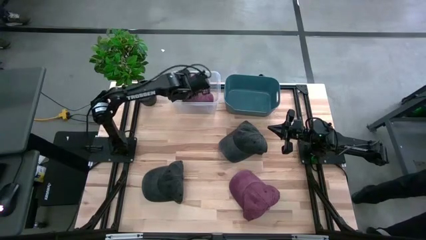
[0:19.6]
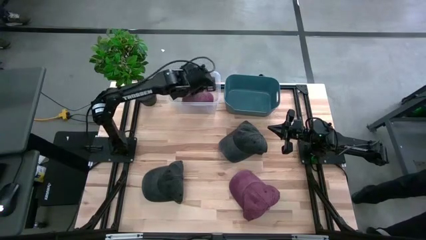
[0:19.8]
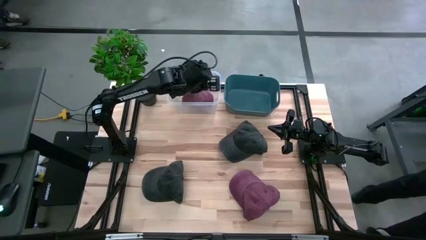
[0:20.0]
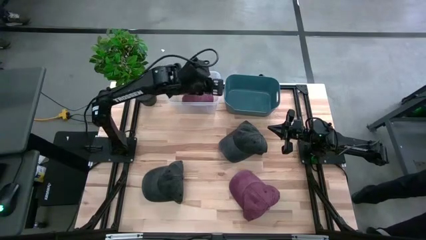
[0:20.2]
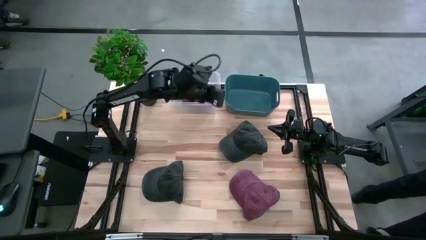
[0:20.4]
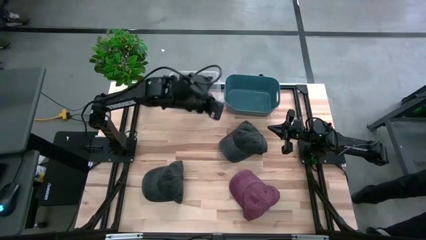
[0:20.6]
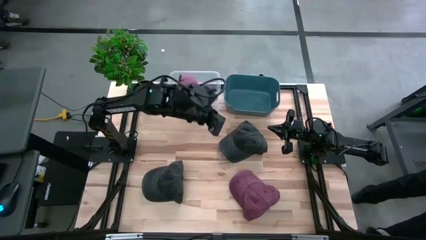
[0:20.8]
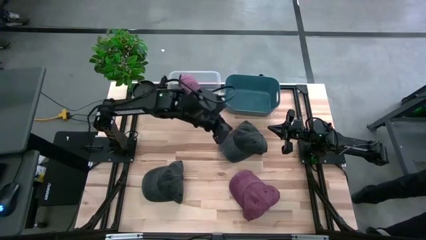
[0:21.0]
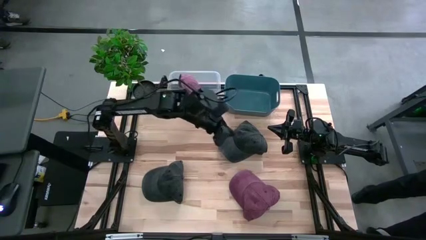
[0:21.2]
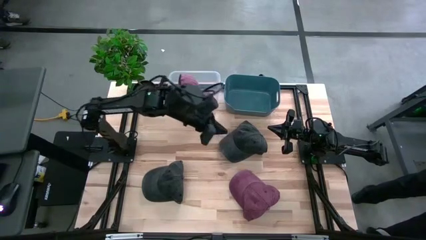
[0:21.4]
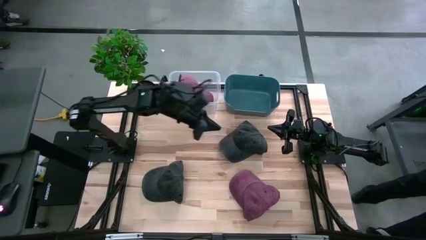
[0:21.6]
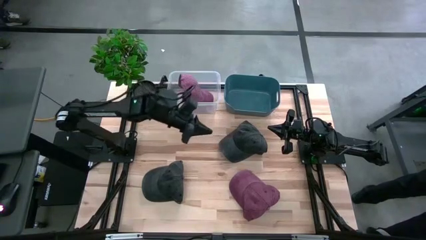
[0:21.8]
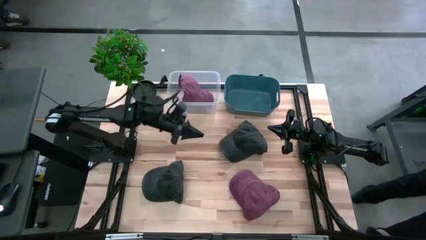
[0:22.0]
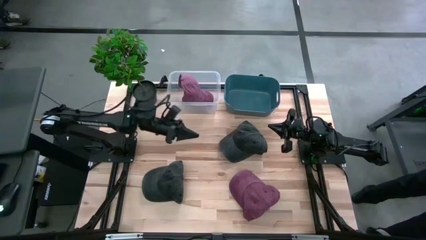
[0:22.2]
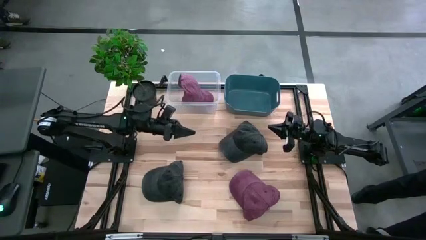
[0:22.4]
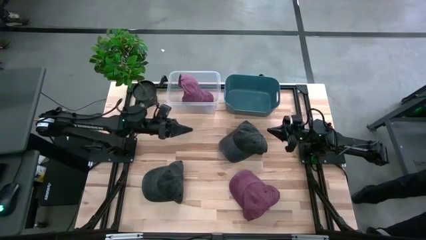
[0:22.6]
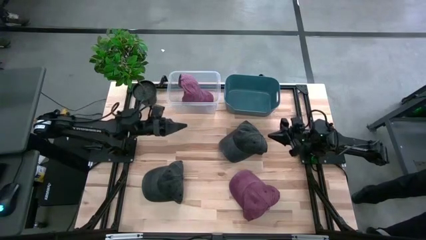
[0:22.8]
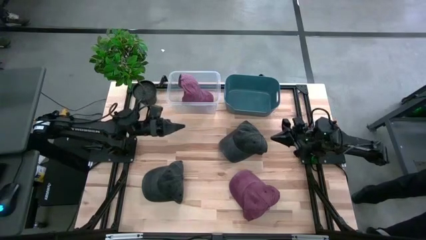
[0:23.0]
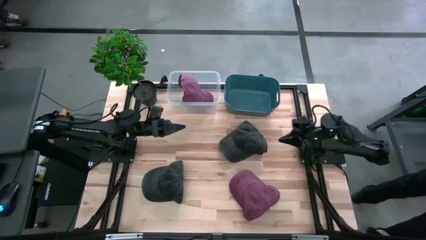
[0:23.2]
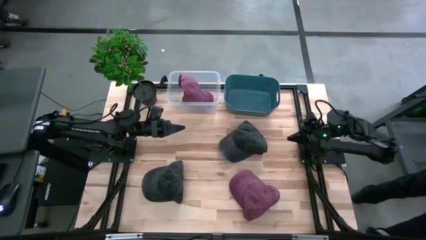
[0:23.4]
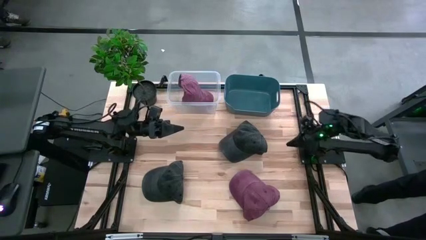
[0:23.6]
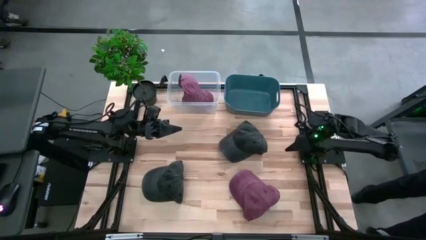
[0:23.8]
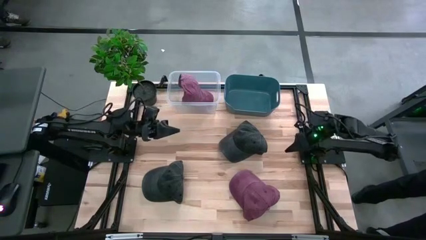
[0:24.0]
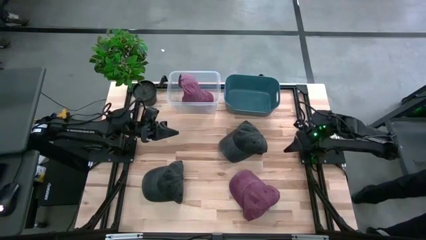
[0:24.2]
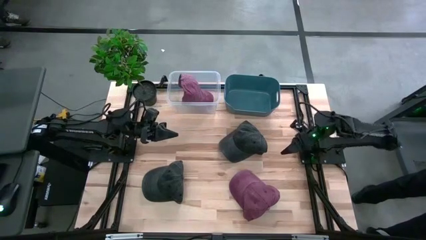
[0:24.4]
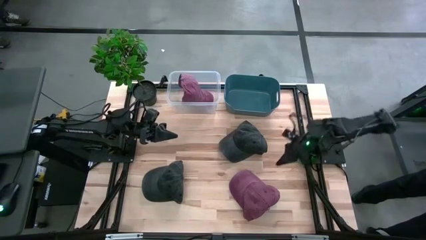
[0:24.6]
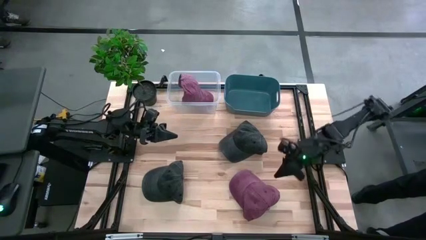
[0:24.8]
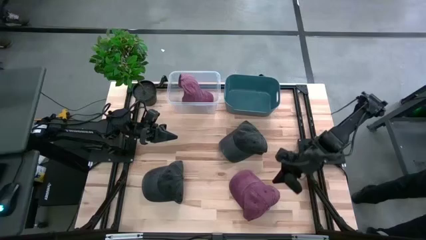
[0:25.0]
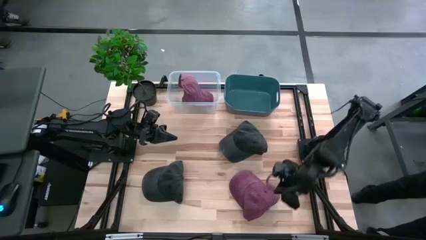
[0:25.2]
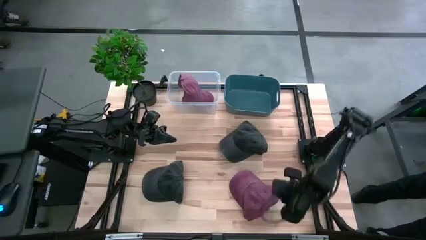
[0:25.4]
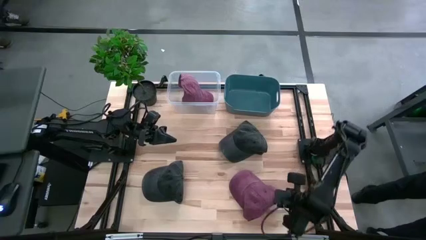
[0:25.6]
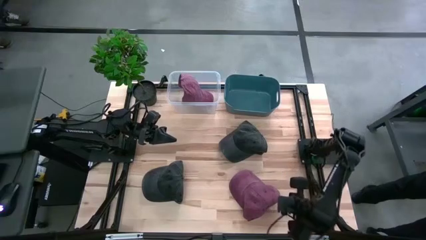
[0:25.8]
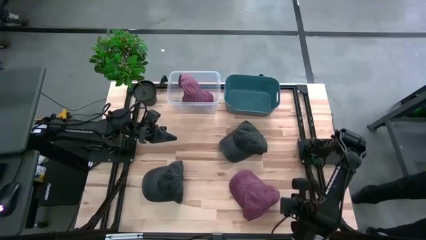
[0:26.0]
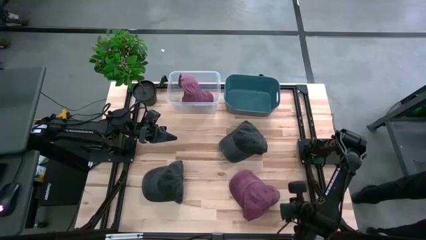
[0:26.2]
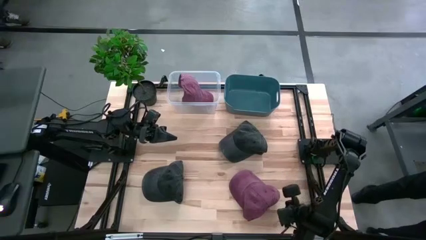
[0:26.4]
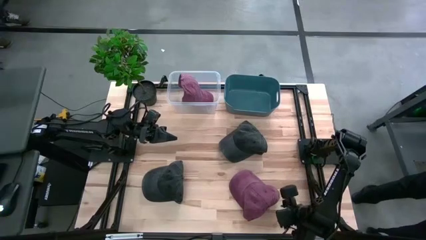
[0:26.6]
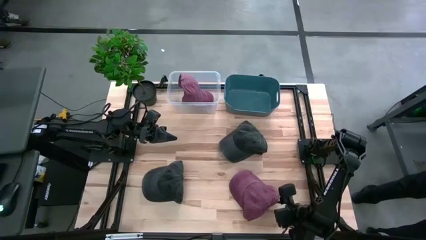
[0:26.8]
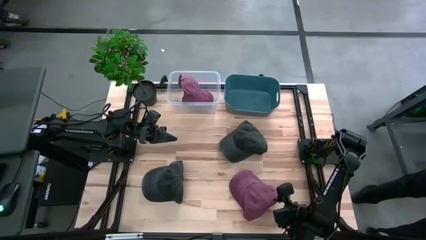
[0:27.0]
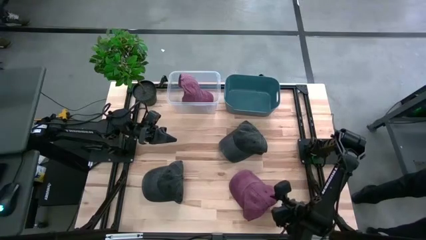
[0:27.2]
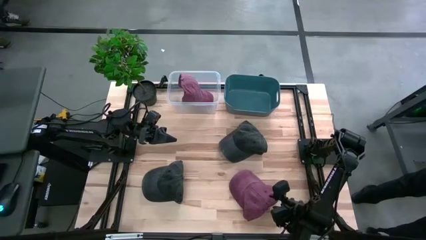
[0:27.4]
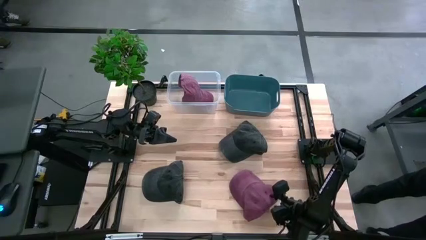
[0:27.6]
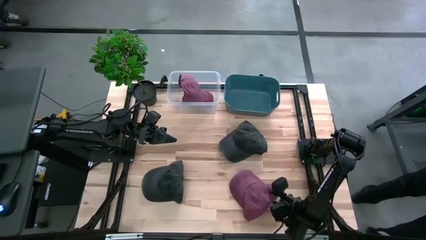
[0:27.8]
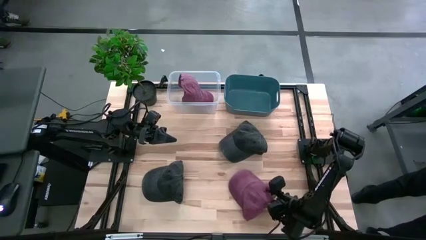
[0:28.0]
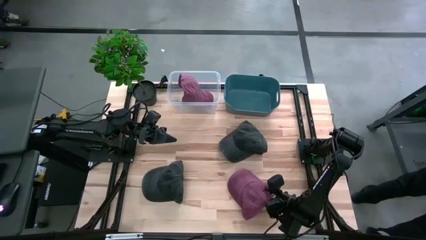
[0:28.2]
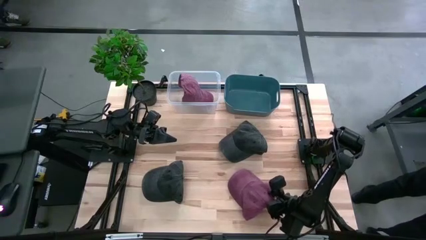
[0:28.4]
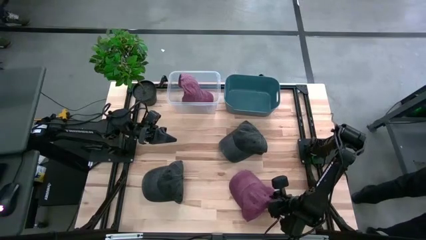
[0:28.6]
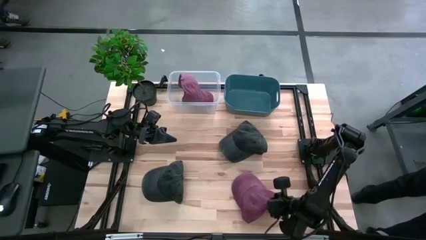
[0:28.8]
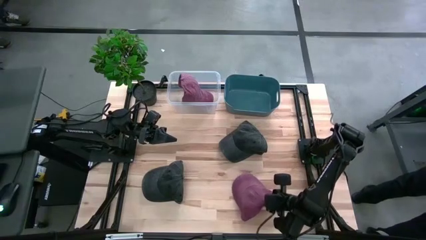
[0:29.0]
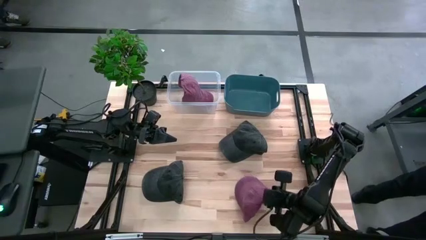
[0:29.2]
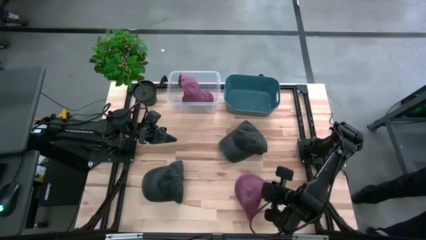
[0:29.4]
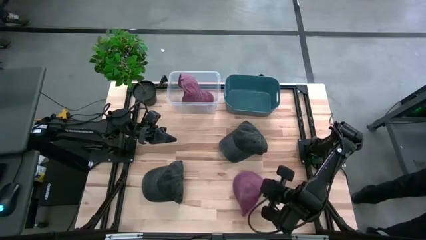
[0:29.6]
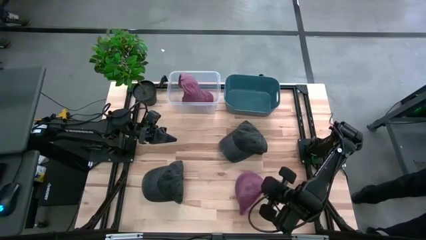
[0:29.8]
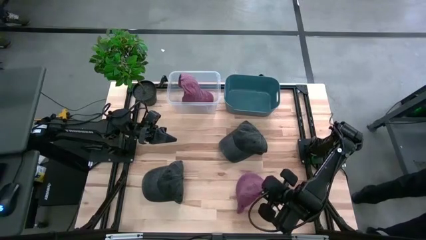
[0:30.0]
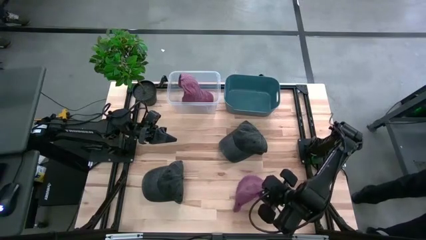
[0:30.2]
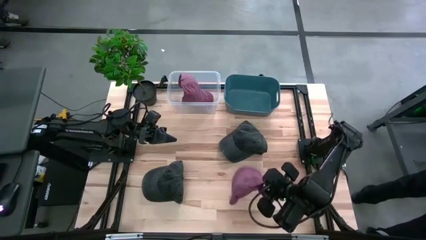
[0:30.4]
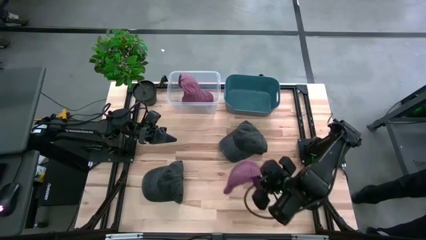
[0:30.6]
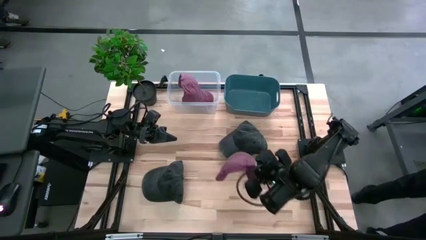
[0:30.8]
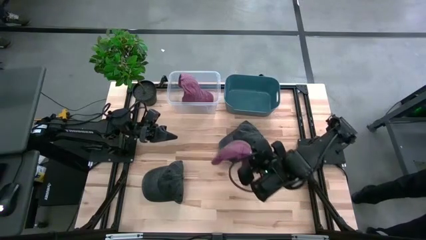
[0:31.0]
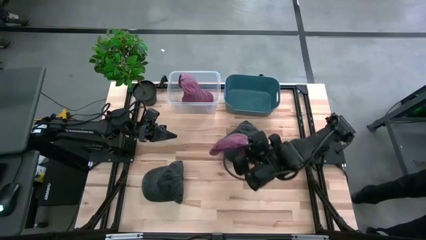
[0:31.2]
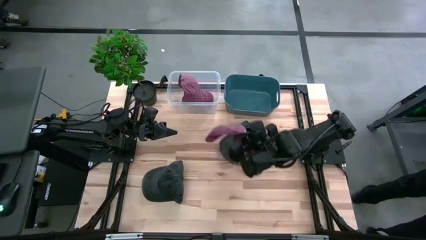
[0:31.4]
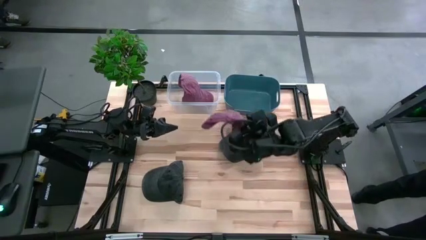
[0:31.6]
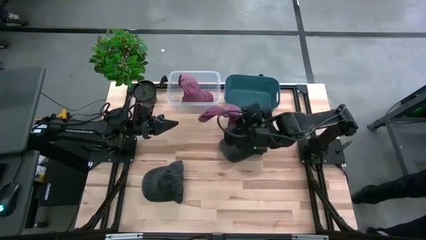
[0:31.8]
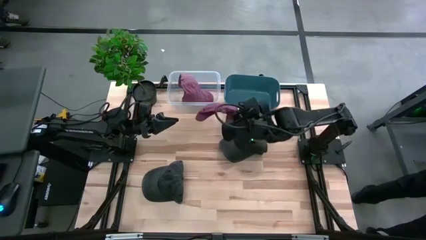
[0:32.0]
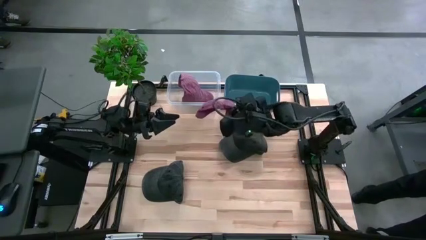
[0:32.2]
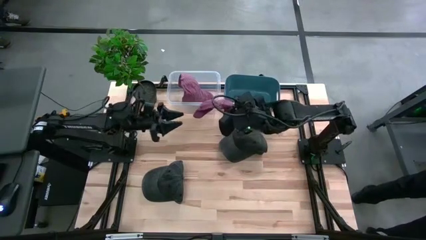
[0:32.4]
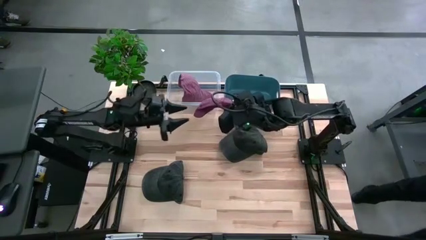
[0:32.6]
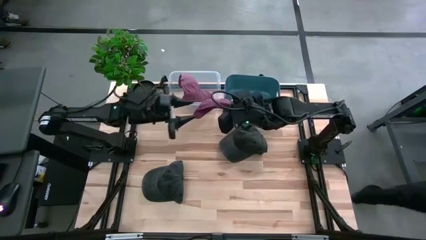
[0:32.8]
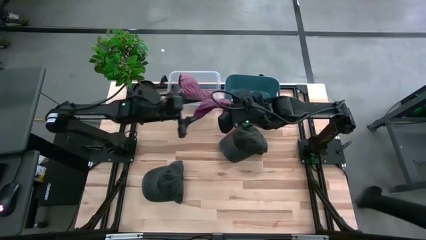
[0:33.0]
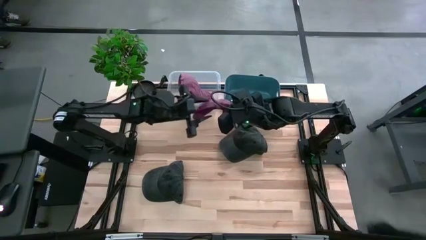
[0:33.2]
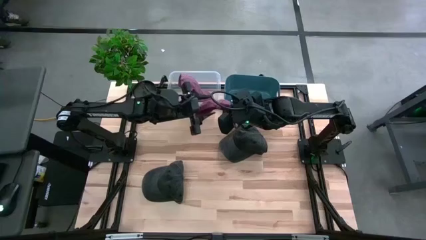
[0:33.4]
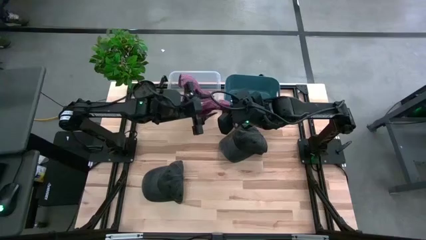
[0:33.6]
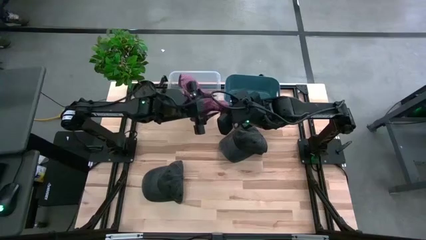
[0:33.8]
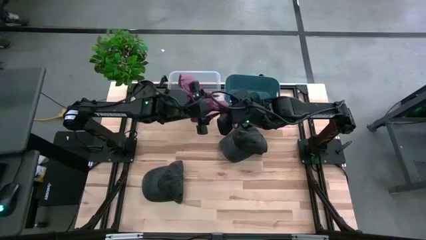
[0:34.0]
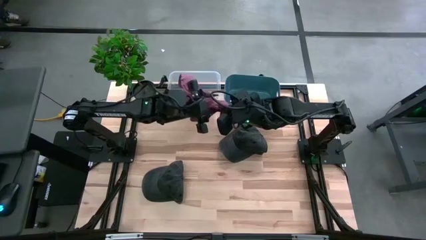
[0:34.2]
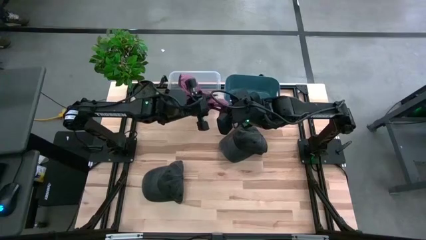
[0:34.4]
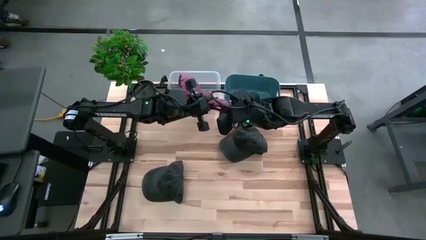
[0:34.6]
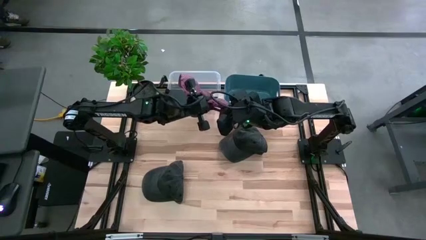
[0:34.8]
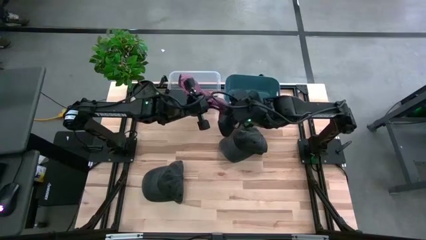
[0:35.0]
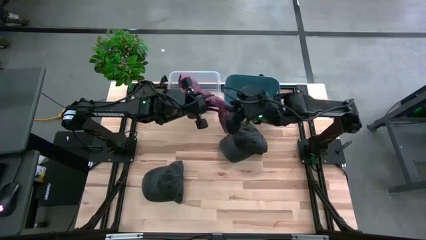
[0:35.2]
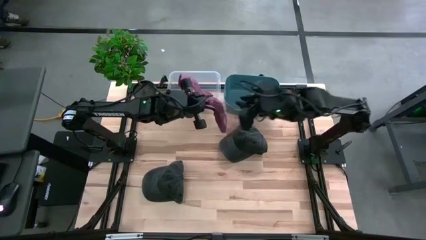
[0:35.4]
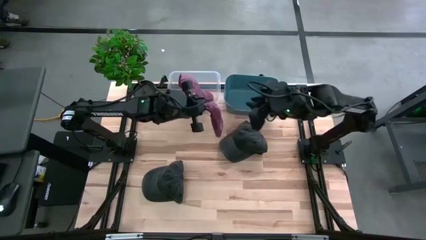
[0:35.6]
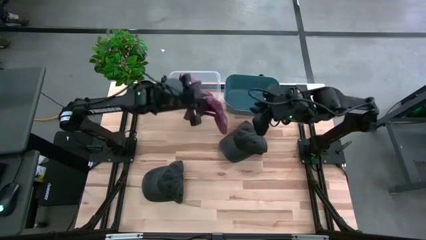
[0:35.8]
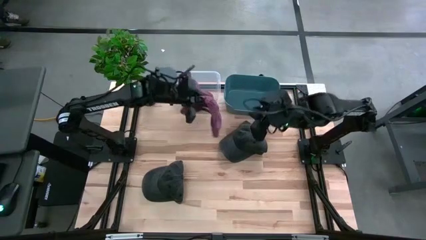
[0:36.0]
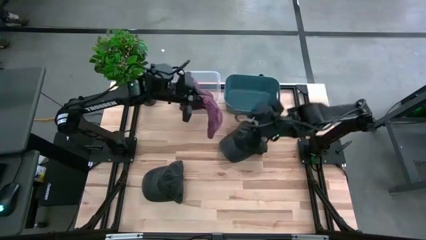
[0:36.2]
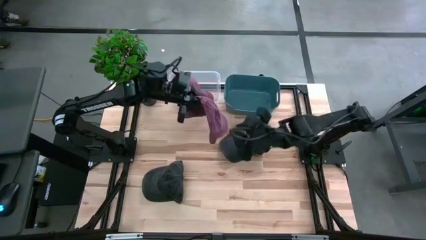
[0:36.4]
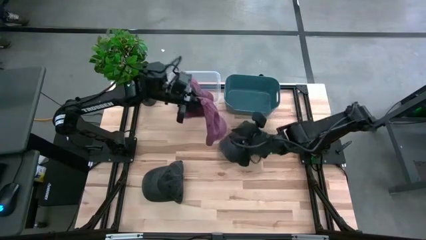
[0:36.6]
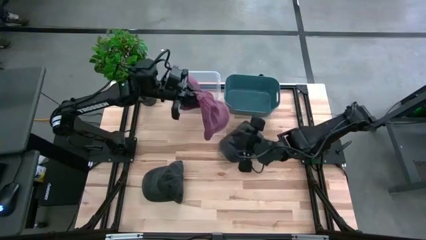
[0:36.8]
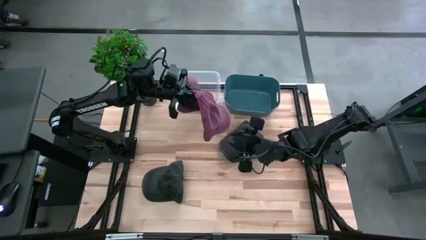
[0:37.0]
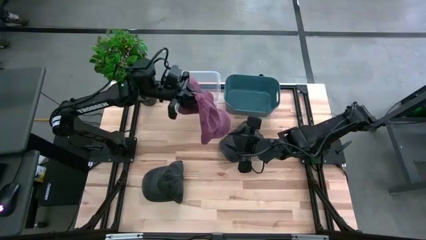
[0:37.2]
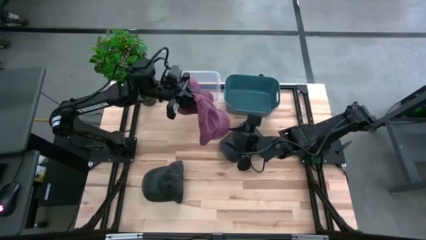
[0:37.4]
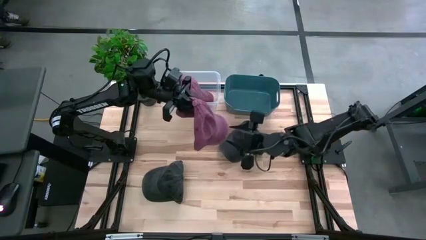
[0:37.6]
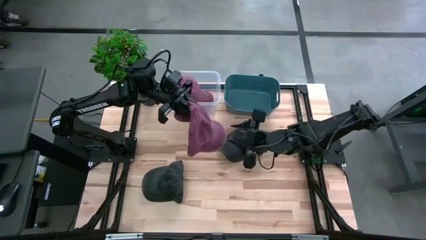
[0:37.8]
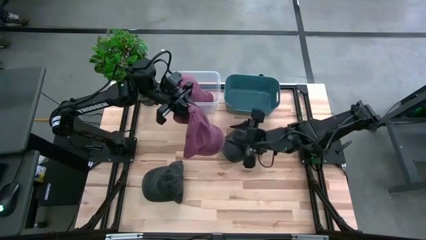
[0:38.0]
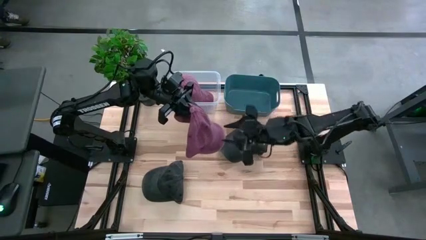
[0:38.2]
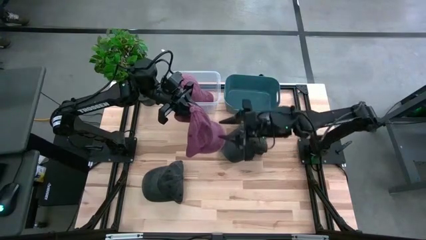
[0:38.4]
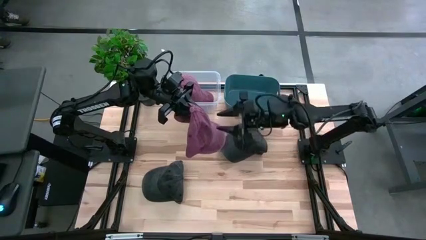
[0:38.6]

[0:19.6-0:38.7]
Task: Pick & Place hat
Put the red cap into the transparent bin
